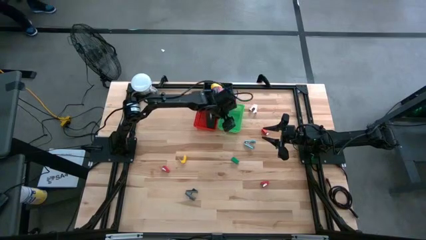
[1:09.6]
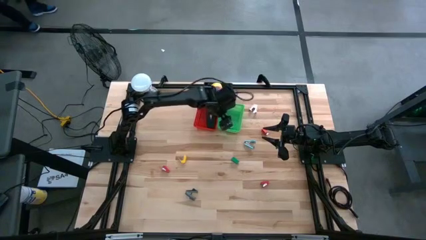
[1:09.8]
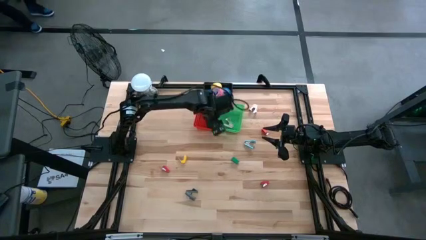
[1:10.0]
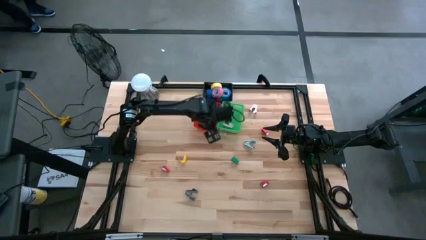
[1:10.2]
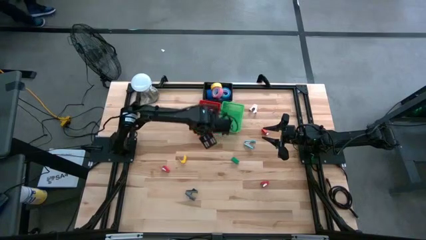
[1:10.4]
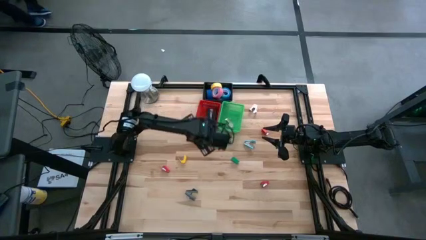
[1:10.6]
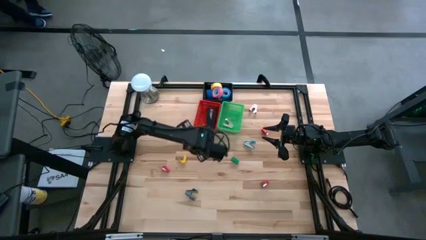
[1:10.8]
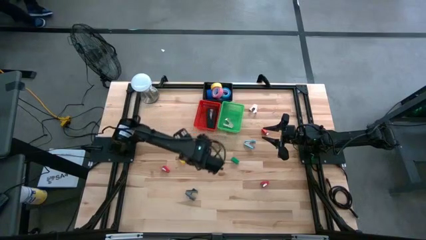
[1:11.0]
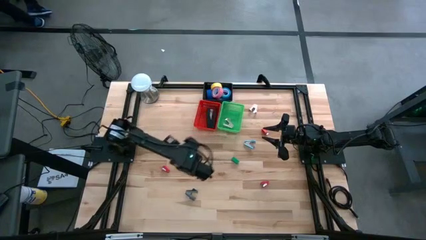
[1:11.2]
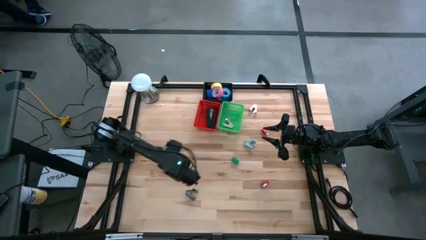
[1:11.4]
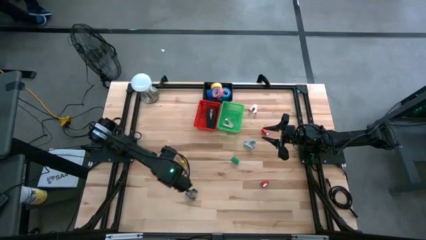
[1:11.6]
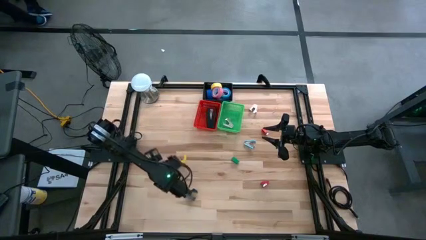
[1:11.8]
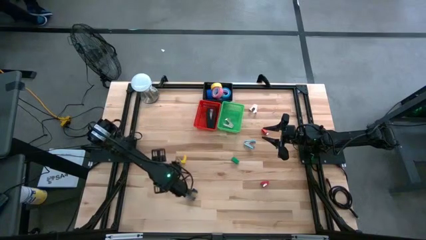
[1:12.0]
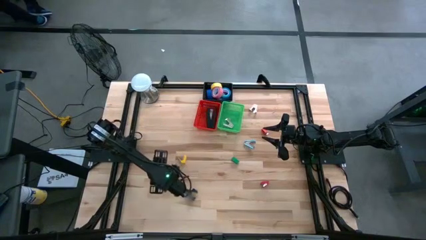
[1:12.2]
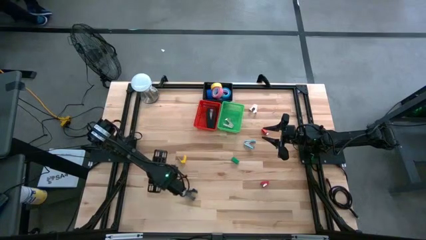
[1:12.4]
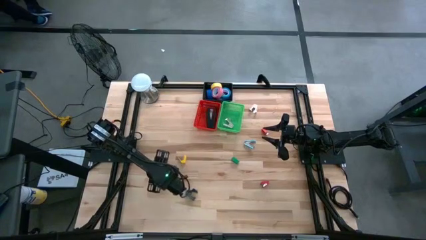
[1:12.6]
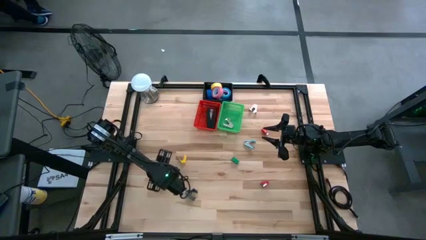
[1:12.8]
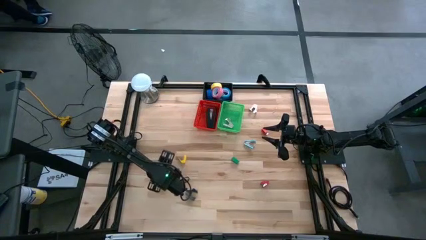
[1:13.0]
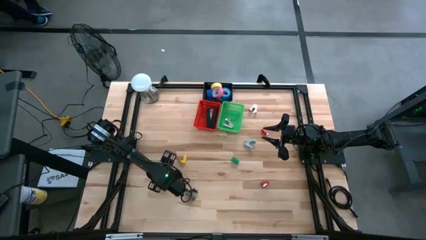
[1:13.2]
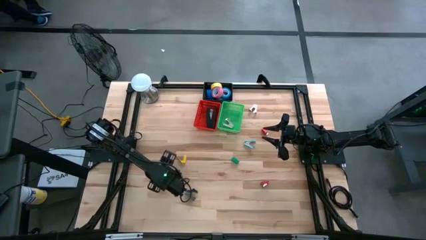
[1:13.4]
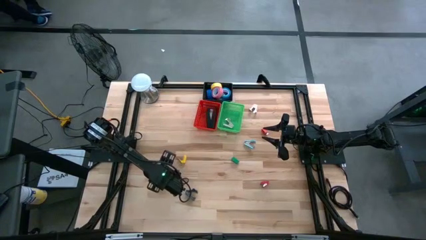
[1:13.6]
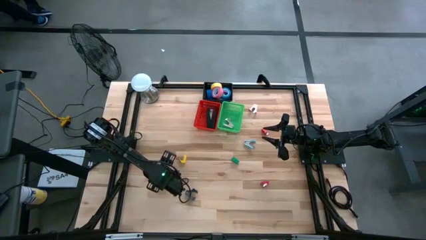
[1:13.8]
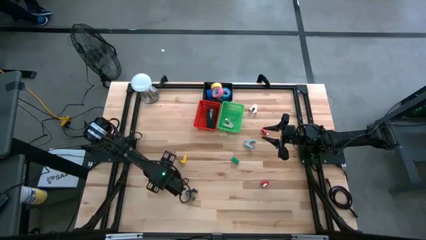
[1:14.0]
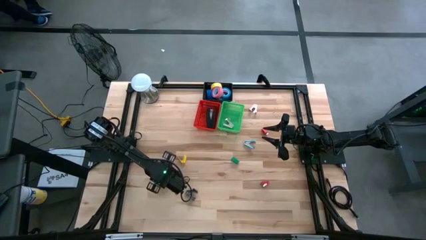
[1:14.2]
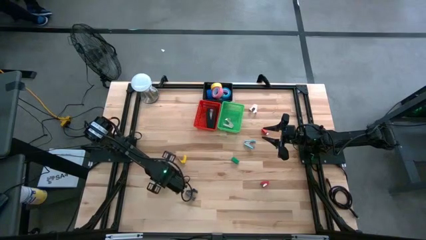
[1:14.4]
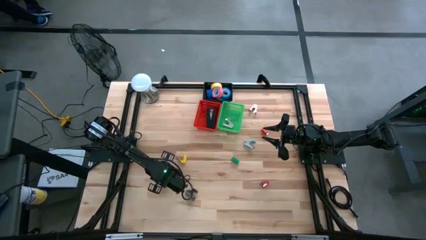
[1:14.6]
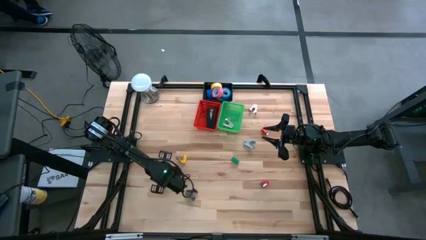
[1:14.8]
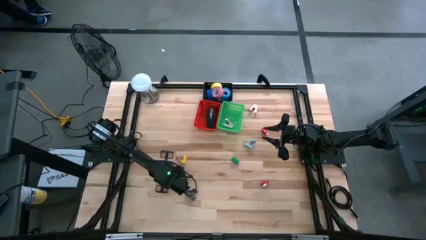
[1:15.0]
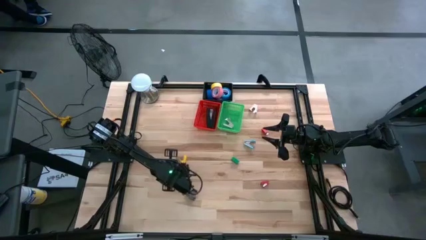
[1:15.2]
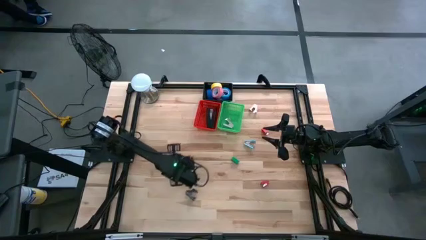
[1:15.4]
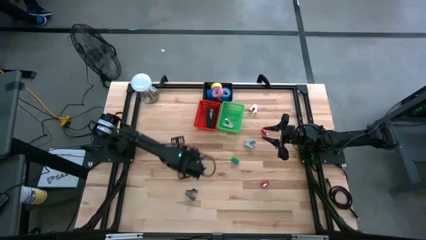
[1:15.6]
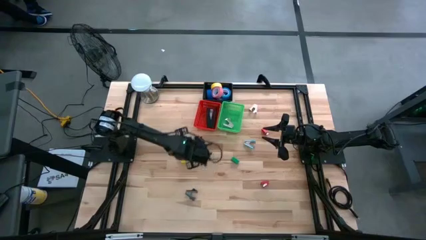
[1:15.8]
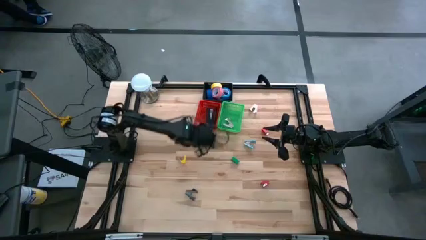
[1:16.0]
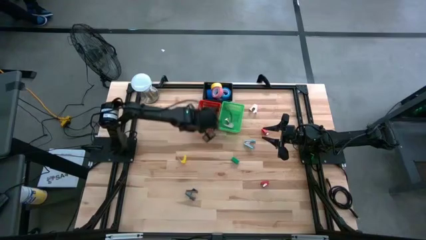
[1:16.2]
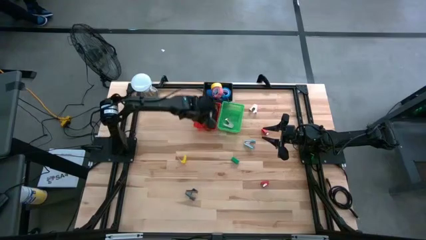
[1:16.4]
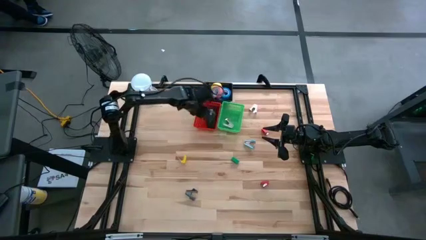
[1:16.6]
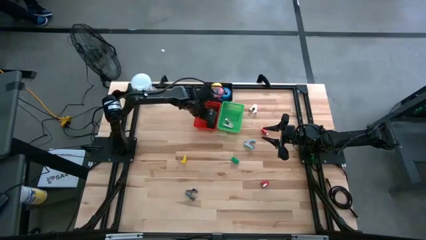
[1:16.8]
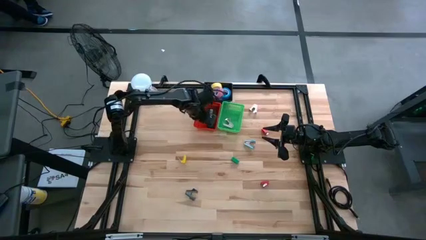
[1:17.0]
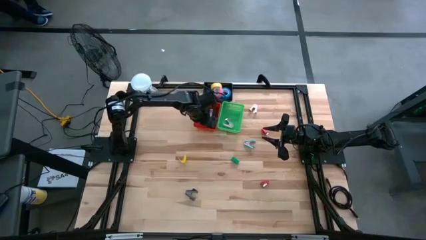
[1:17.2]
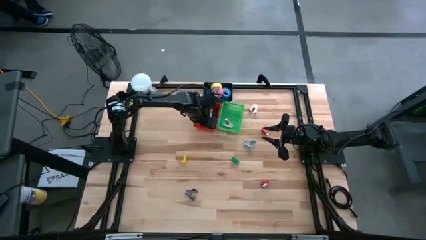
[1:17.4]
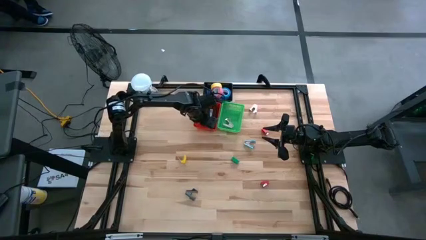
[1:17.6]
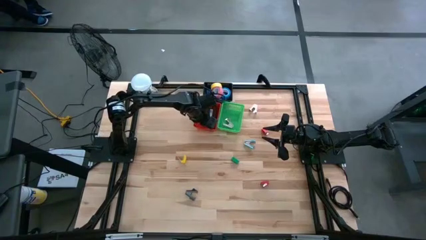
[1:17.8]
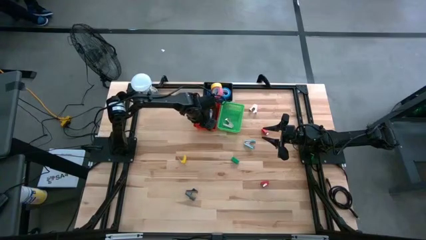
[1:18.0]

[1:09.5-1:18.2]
Task: Pick and place Stapler, Stapler remover, tape
Put the bottom left small red stapler into the red bin

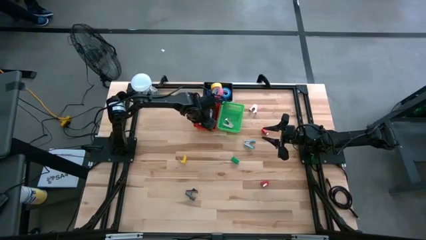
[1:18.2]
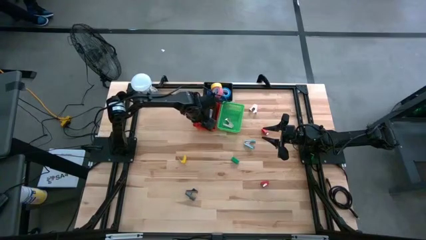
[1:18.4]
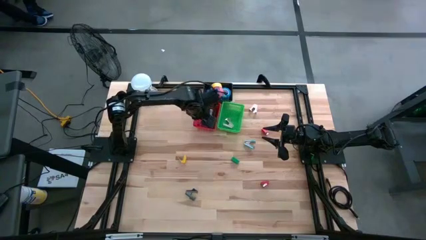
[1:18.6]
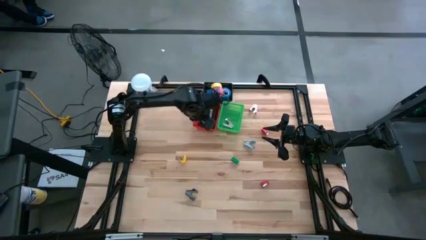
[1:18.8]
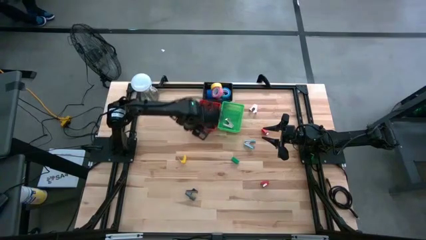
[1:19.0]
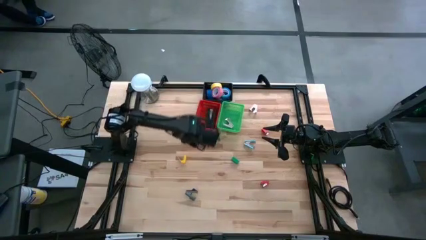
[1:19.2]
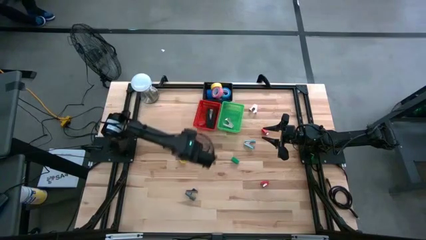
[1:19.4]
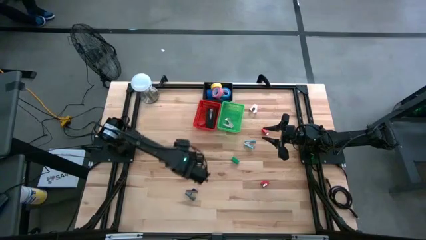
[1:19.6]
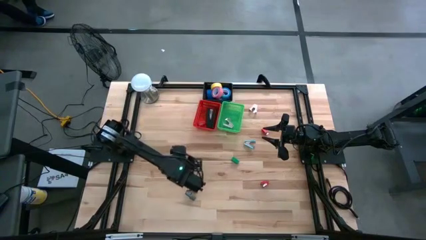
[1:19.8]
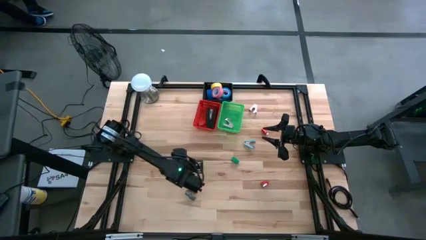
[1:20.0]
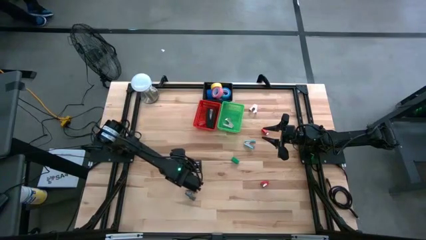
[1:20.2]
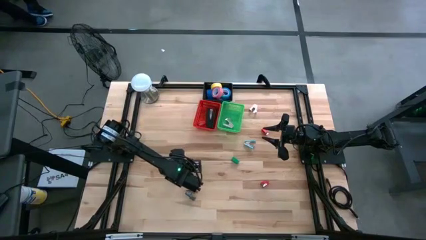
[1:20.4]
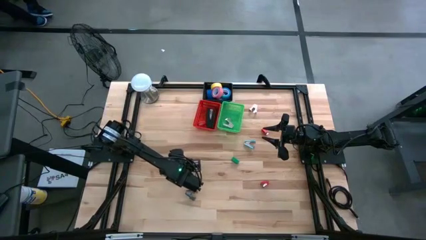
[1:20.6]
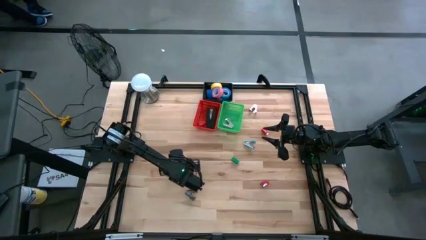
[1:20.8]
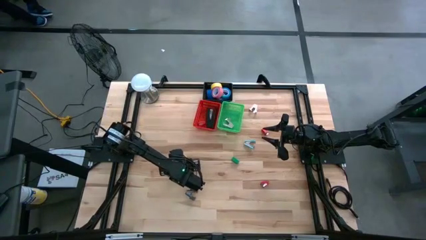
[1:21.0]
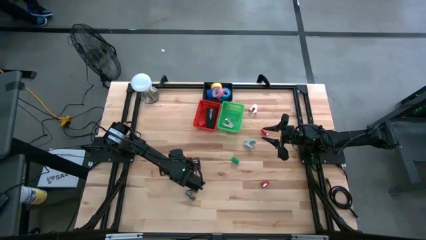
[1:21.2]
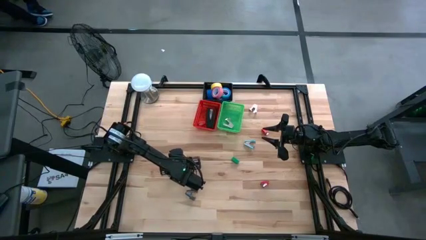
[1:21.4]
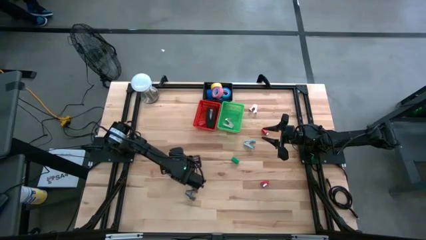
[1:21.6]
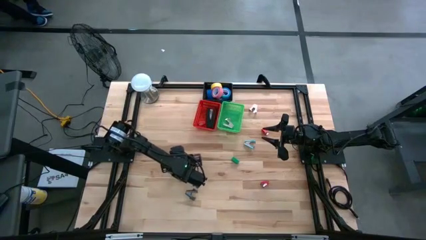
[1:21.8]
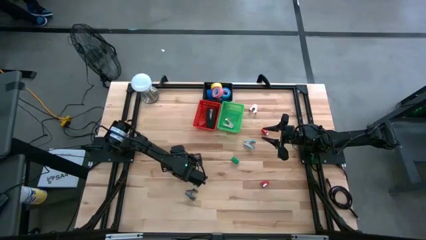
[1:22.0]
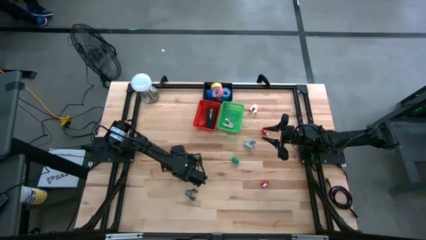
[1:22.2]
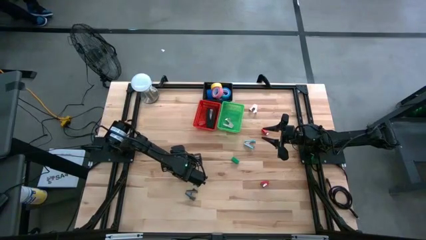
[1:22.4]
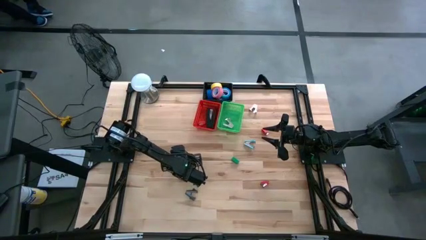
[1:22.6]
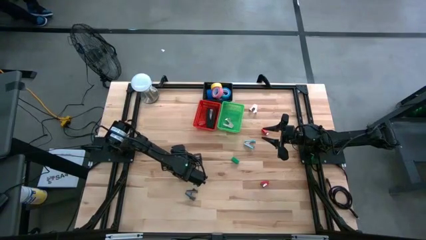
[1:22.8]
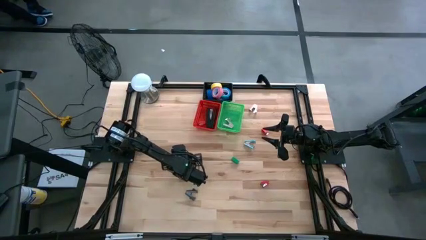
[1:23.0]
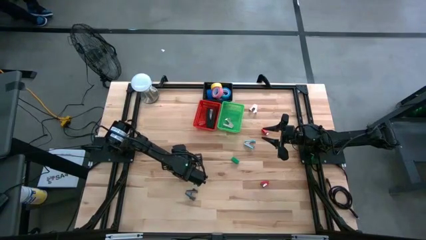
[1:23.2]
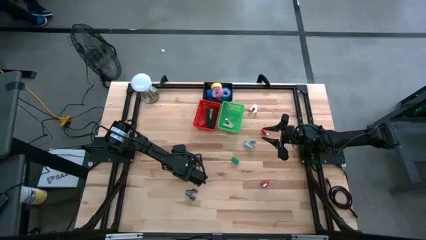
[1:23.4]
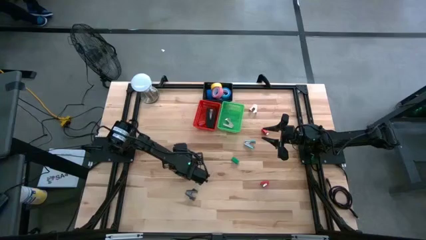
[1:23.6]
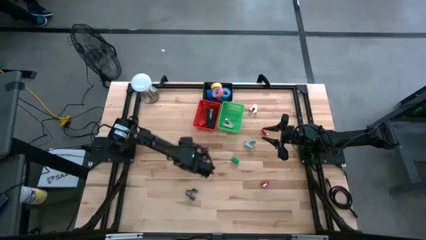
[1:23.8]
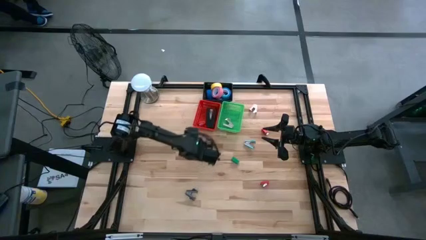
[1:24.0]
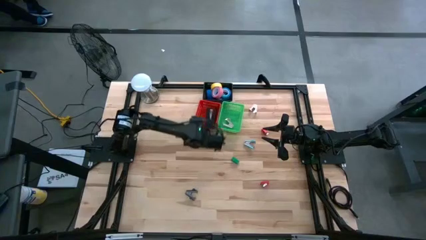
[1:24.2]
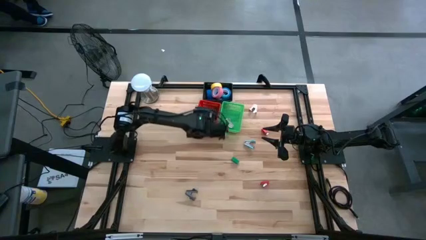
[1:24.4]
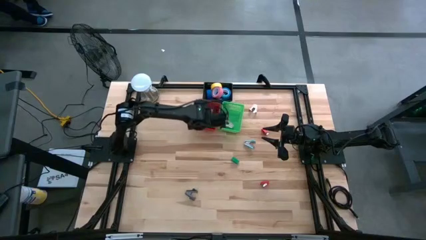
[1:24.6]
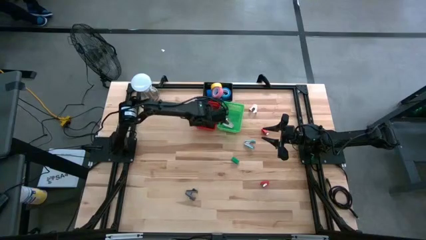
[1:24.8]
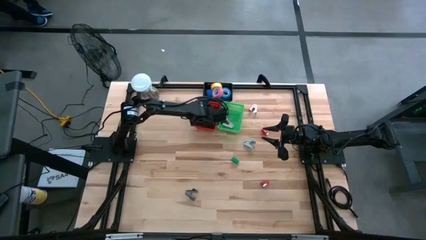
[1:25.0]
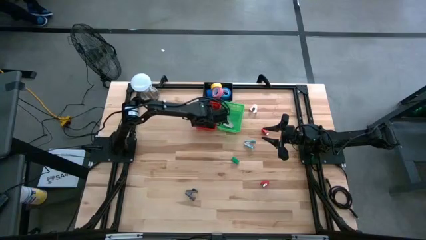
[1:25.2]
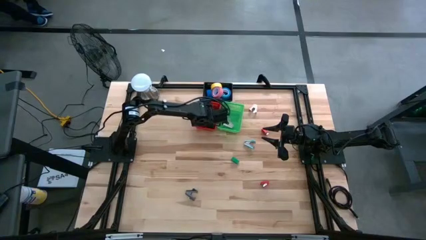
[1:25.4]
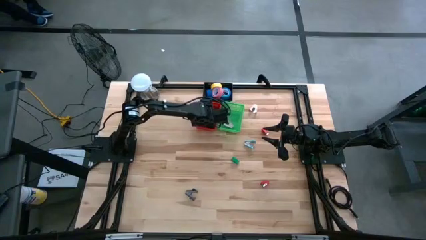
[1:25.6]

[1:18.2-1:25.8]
Put the small yellow stapler into the red bin
